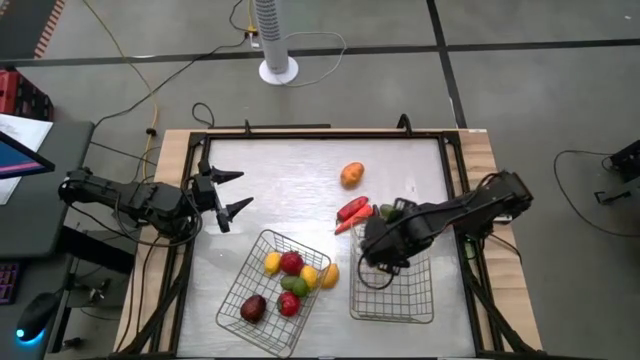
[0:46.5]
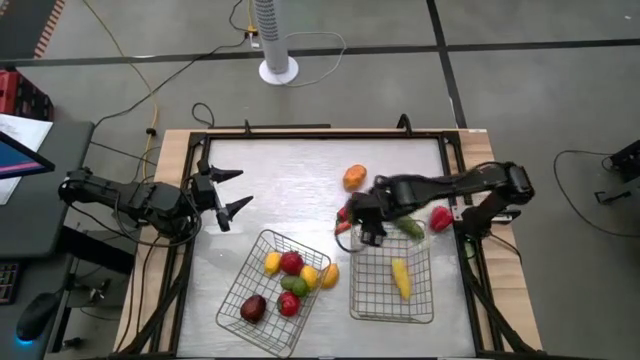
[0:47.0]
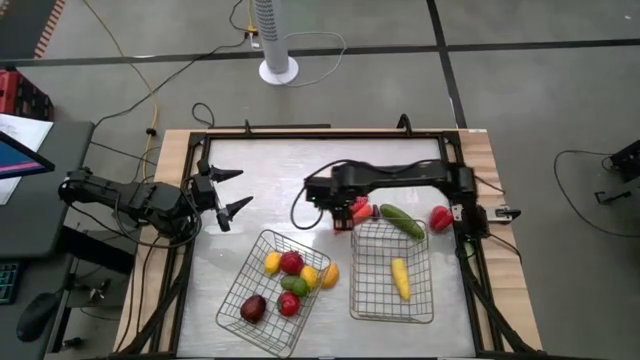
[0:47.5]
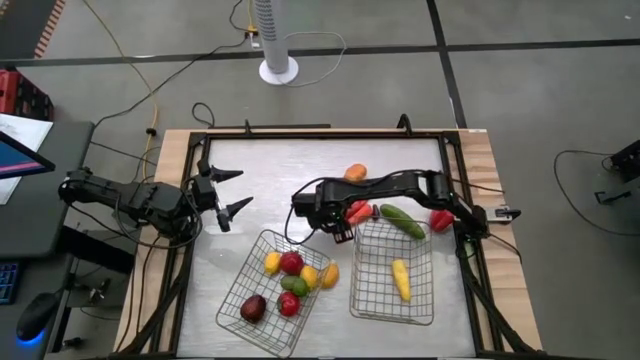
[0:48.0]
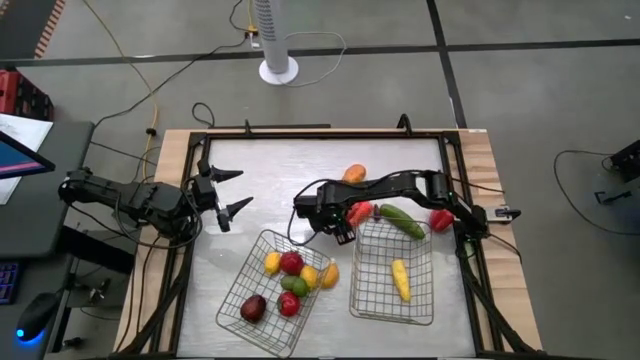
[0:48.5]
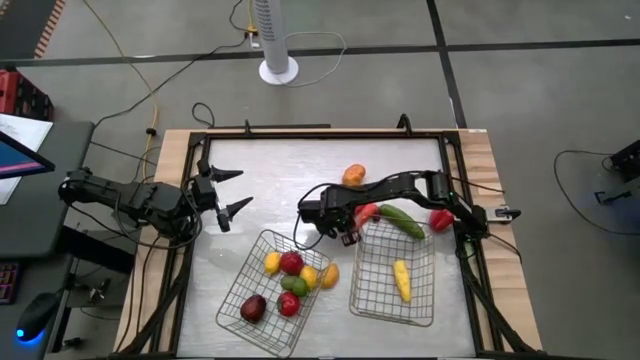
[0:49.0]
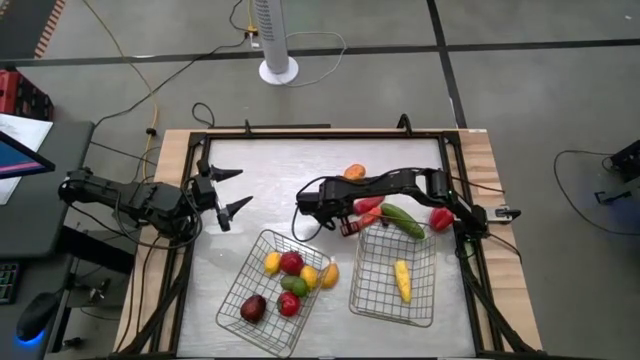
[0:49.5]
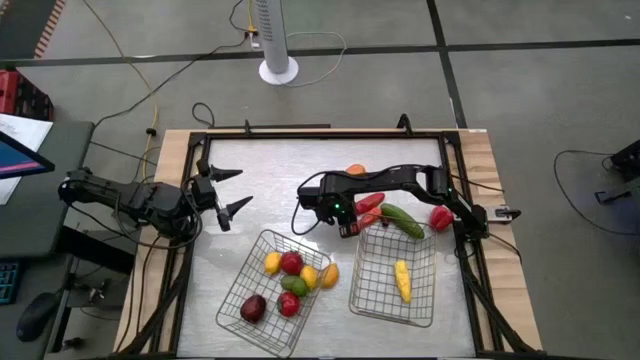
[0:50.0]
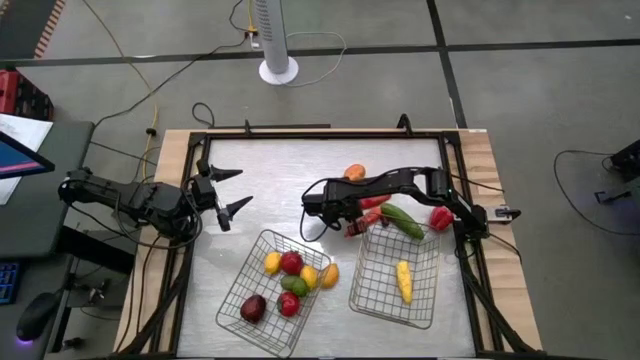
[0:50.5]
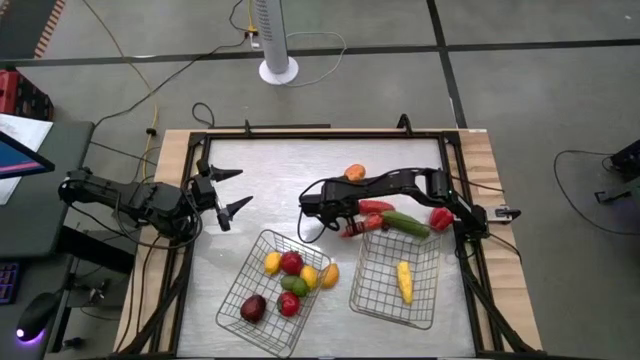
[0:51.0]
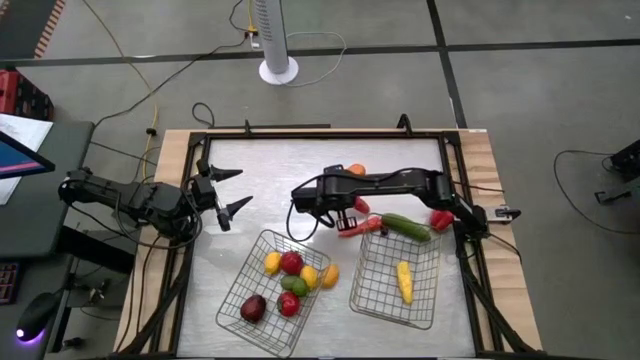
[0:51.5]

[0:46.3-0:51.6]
Task: Sort produce into baskets
Put the red chili pepper into the right wire basket

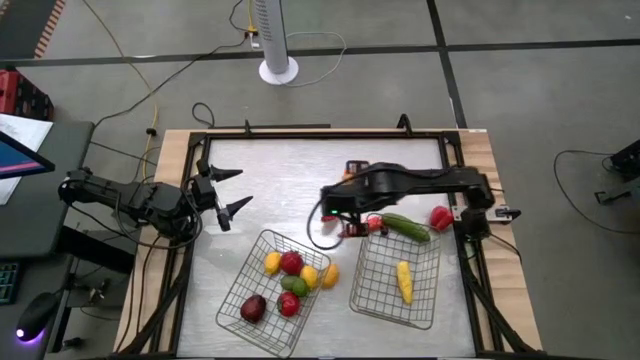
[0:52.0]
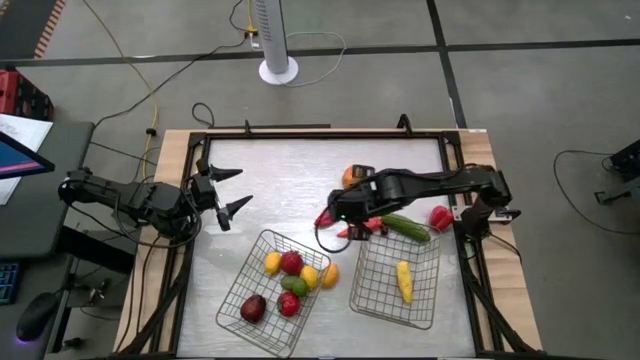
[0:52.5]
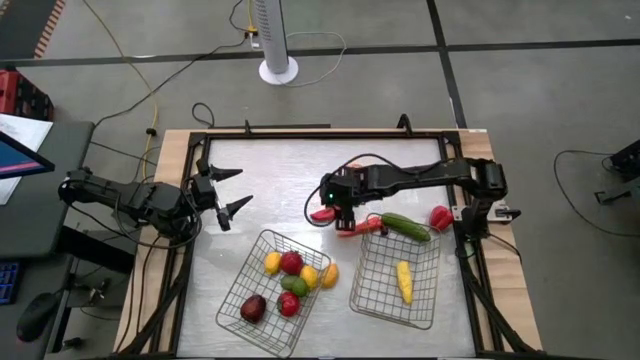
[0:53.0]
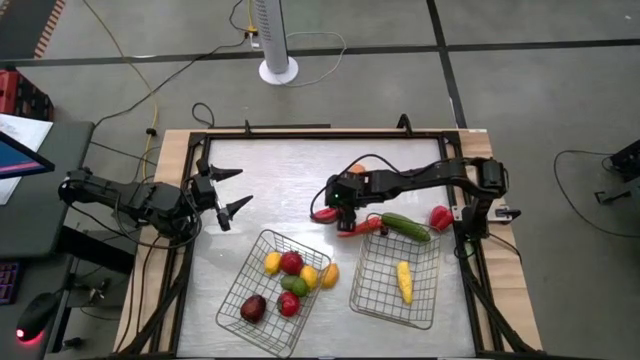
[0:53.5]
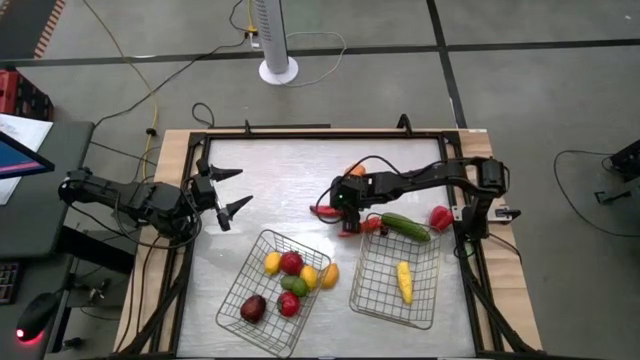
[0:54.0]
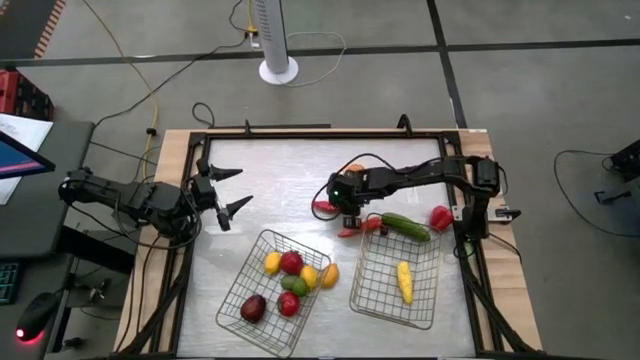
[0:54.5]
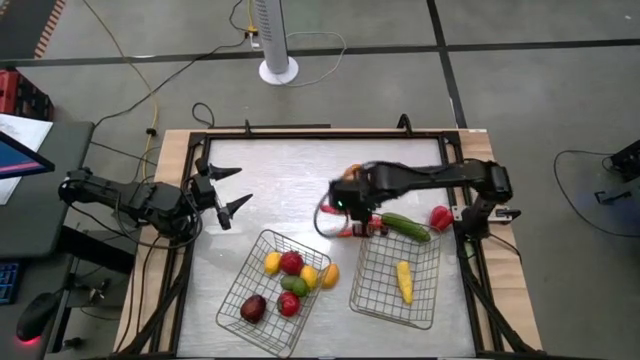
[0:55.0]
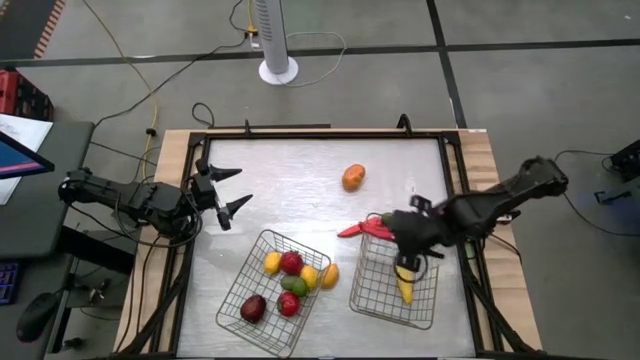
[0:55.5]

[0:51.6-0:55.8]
Put the red chili pepper into the right wire basket

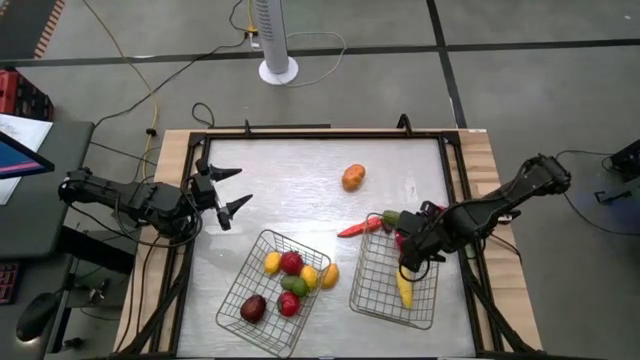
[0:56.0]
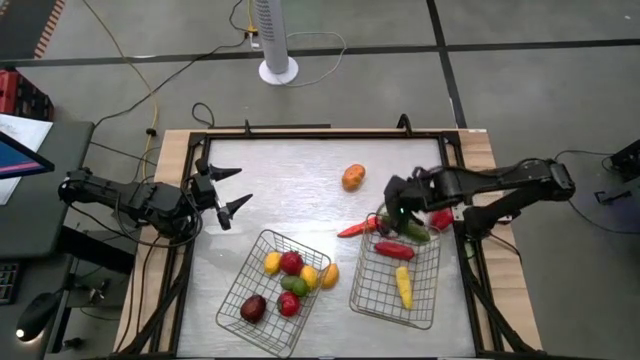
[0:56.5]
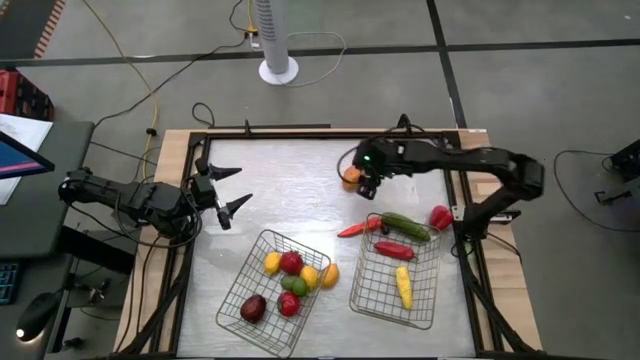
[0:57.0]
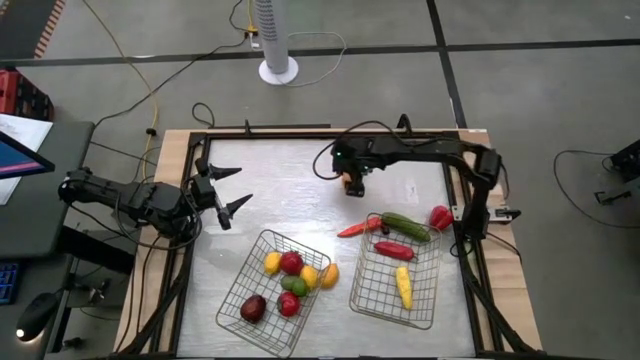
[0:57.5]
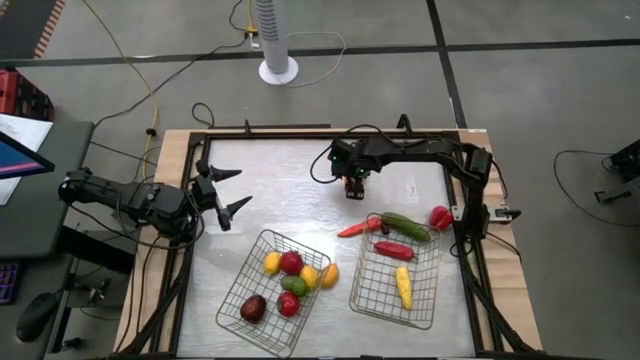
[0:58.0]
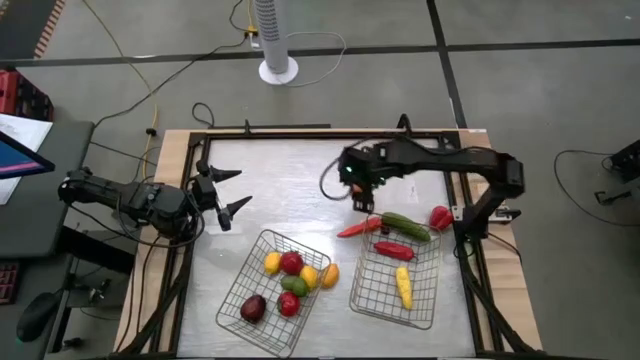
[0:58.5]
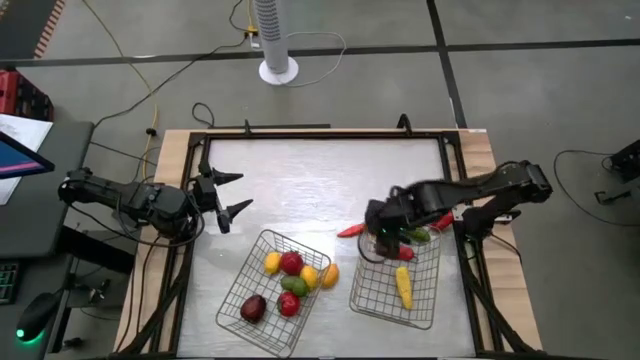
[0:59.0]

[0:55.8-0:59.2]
Put the brown potato into the bottom right wire basket

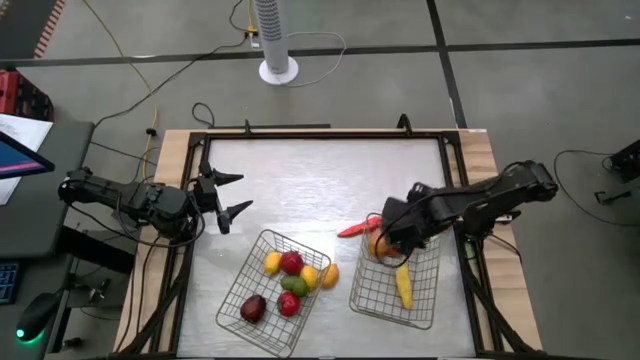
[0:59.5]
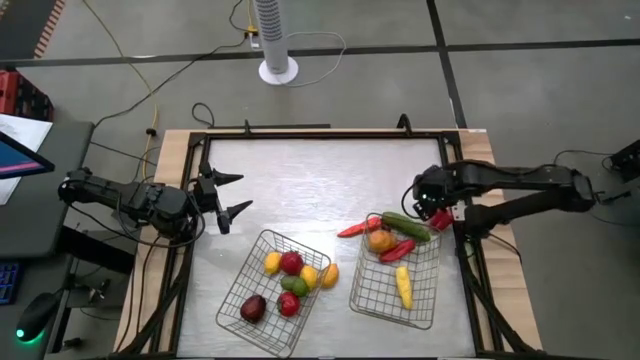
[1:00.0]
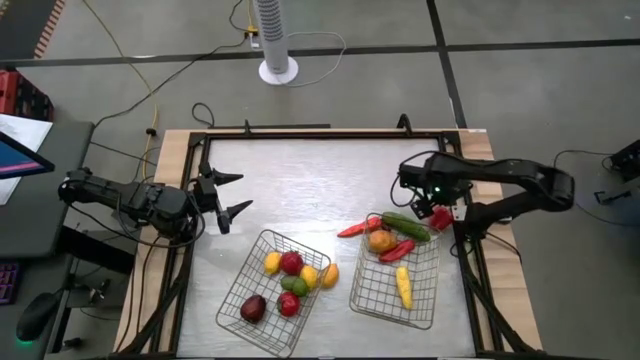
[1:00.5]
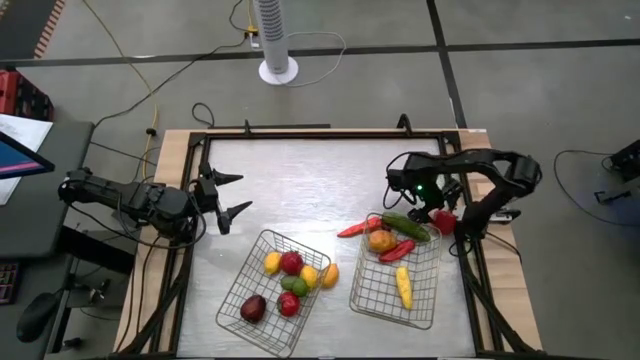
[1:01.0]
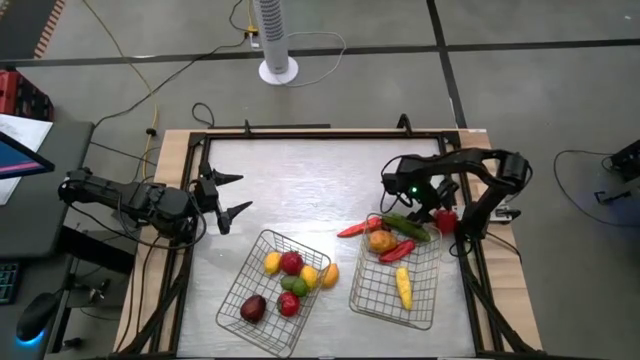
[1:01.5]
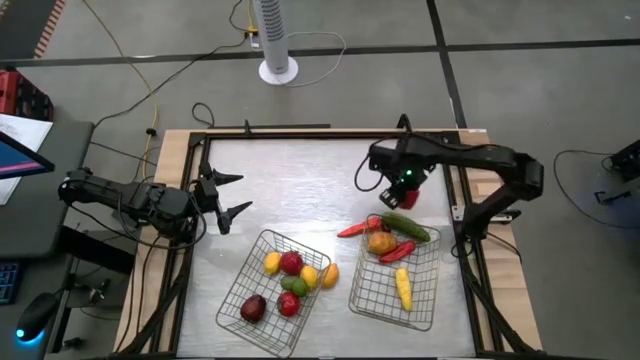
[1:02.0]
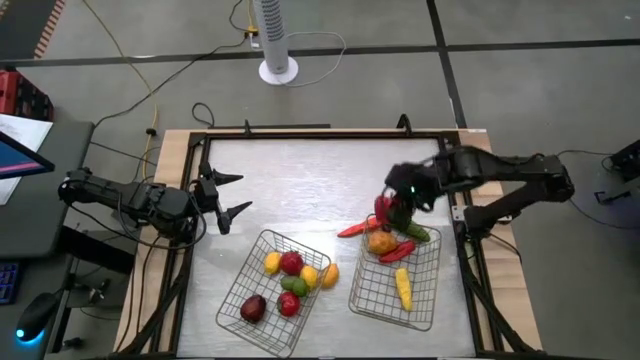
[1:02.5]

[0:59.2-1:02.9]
Put the red bell pepper into the right wire basket

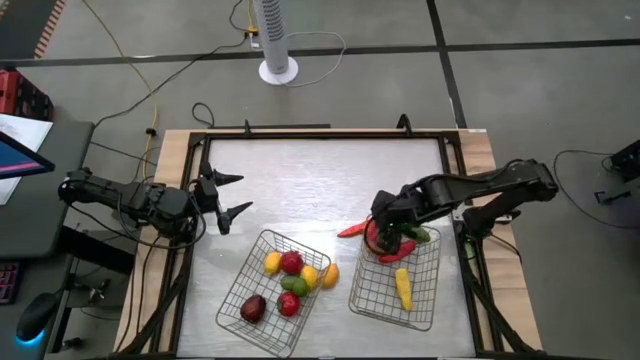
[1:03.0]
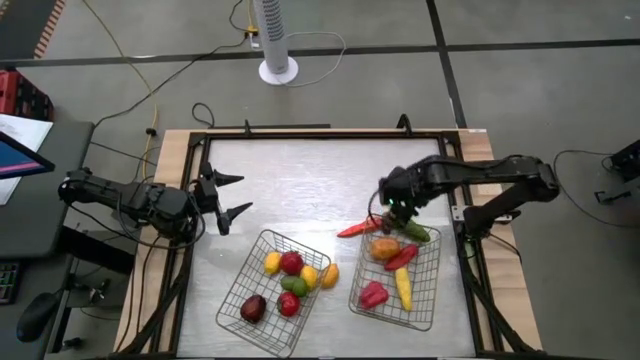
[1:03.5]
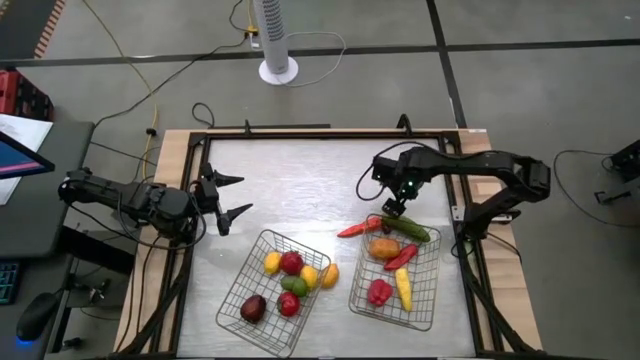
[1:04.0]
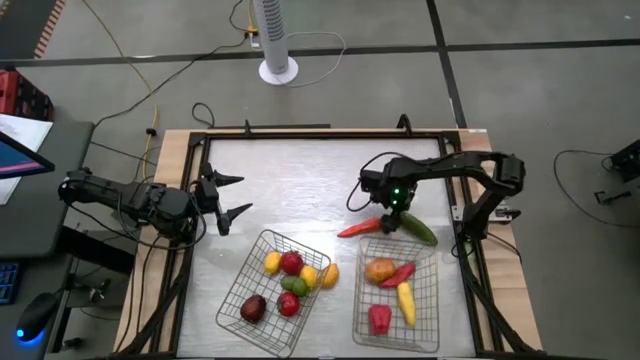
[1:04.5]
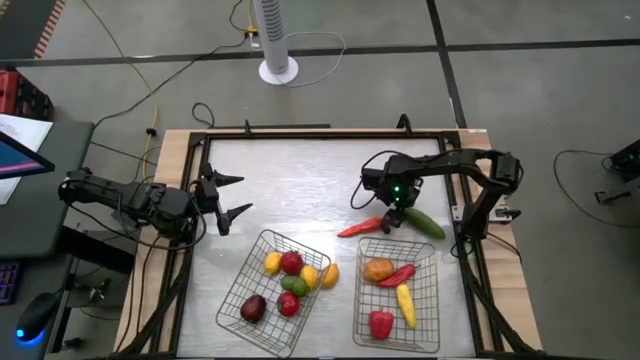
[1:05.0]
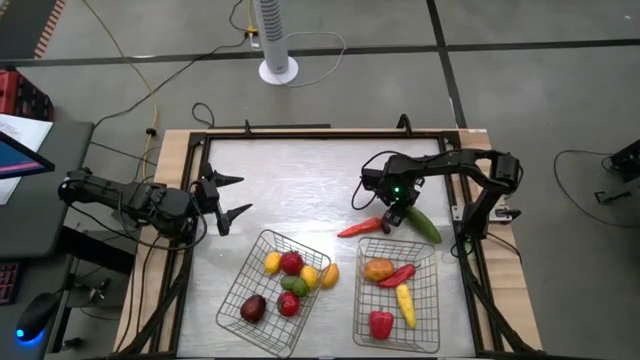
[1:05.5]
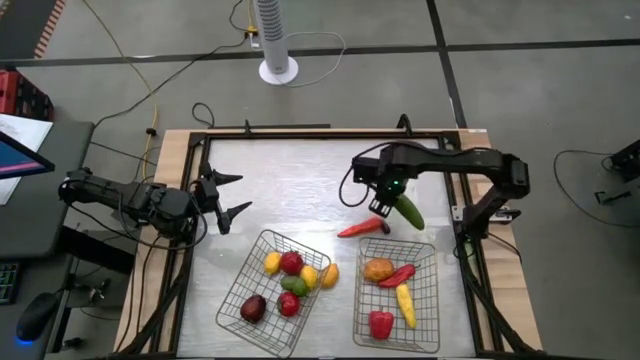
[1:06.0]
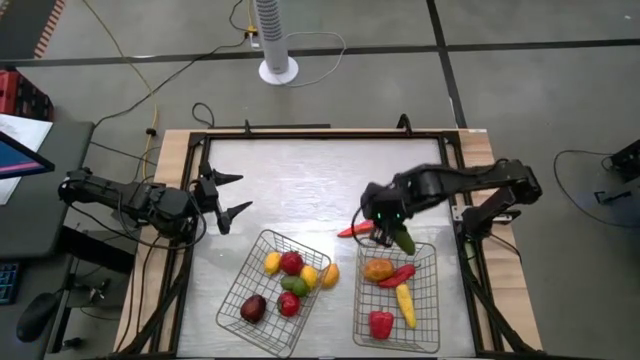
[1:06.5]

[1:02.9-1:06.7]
Put the green cucumber into the right wire basket

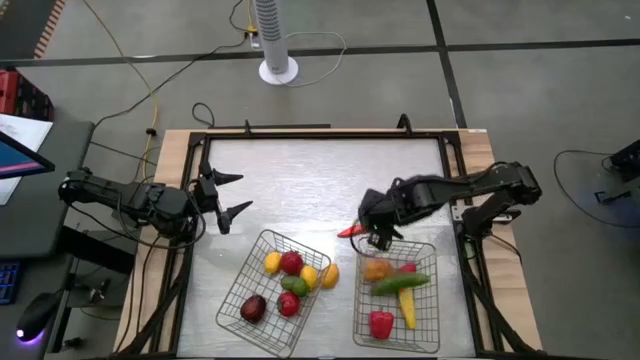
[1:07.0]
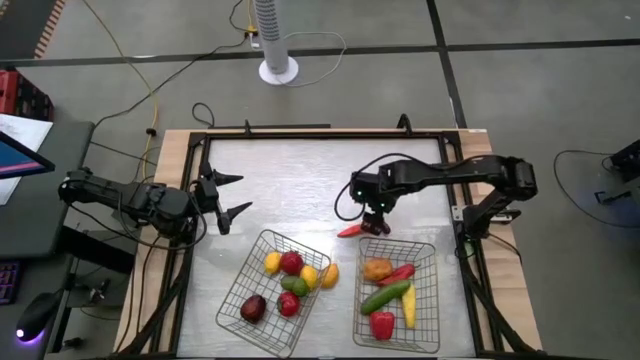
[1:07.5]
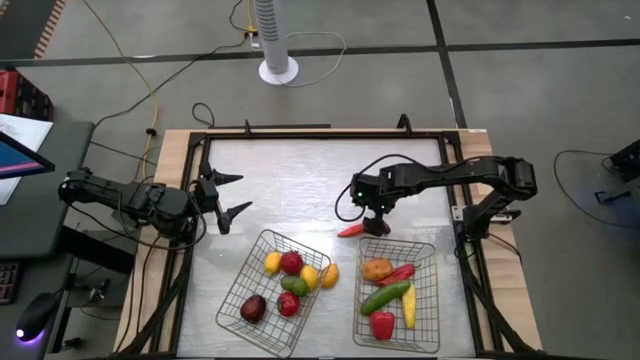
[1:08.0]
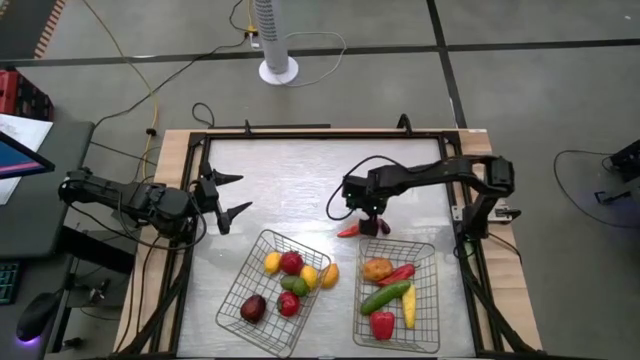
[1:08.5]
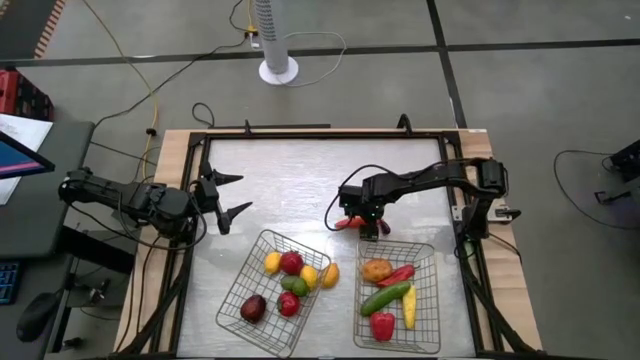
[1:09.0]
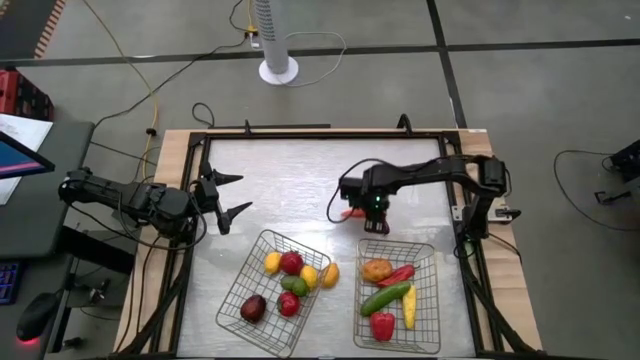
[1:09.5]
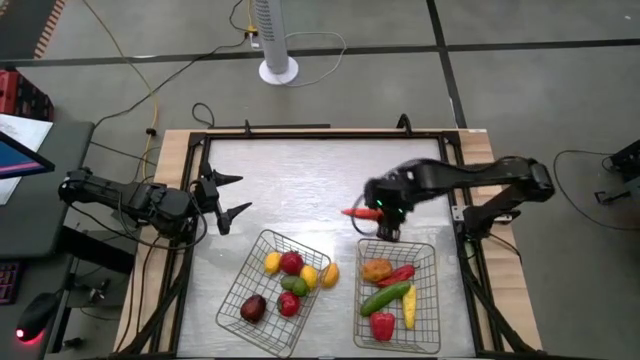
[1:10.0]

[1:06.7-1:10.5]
Put the orange carrot into the right wire basket
